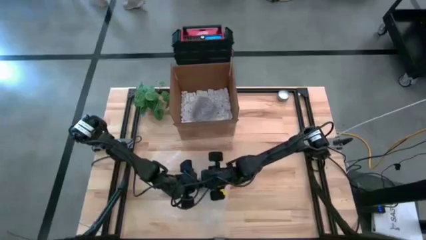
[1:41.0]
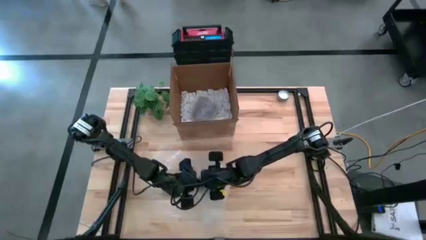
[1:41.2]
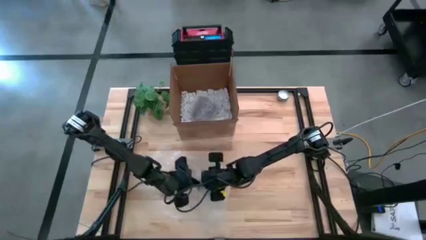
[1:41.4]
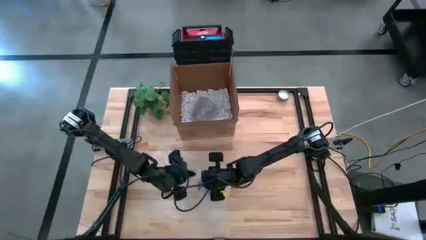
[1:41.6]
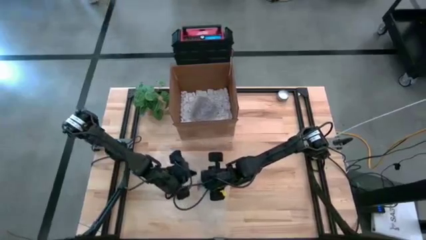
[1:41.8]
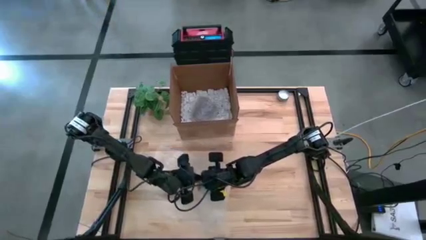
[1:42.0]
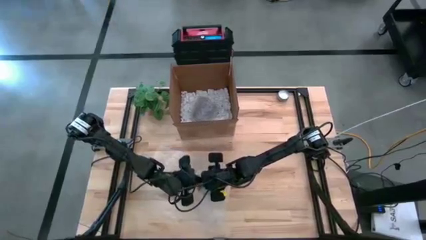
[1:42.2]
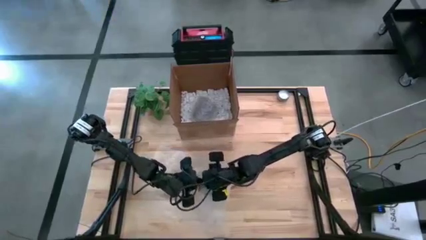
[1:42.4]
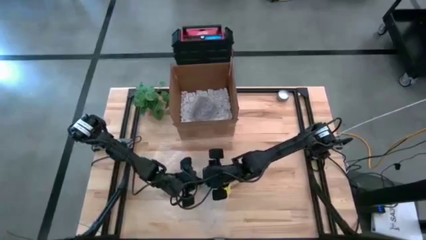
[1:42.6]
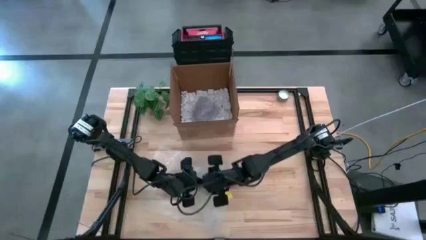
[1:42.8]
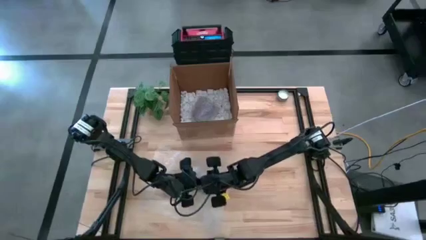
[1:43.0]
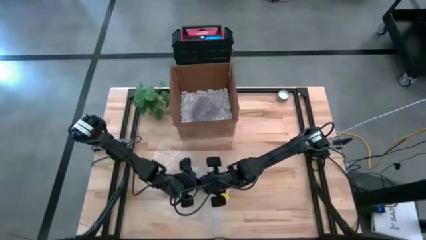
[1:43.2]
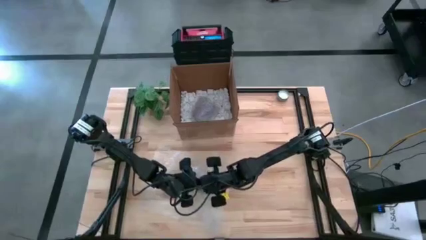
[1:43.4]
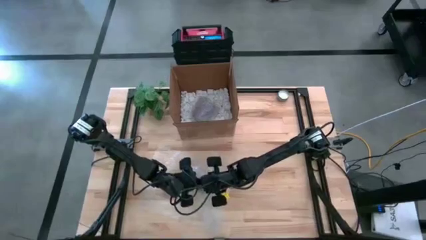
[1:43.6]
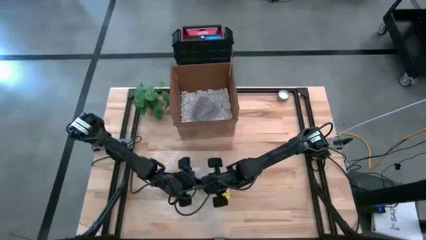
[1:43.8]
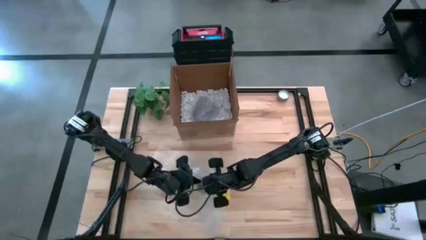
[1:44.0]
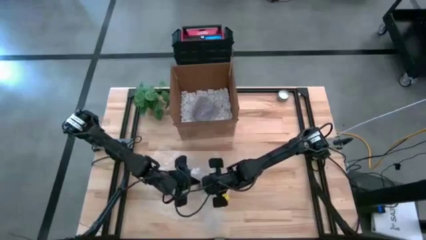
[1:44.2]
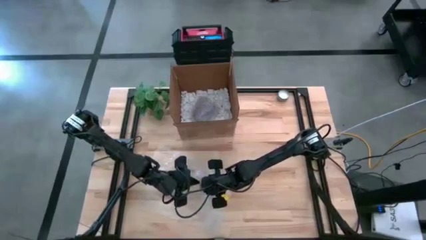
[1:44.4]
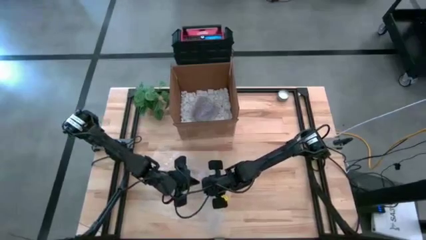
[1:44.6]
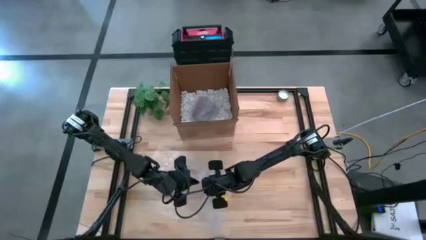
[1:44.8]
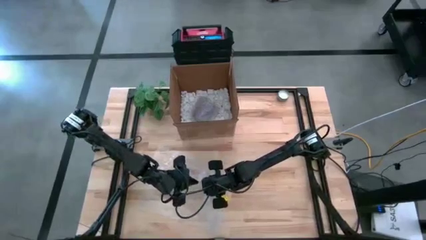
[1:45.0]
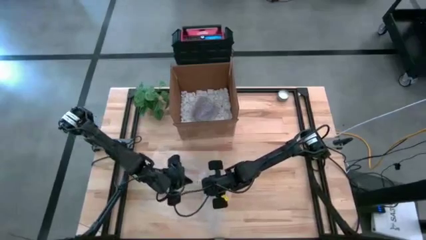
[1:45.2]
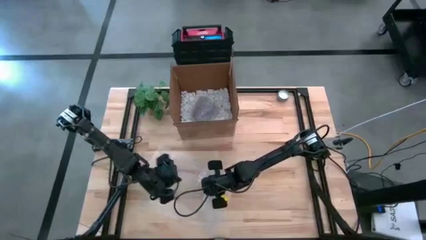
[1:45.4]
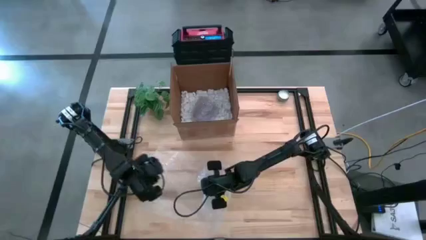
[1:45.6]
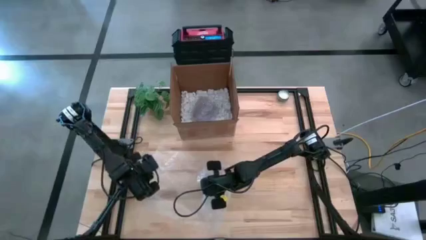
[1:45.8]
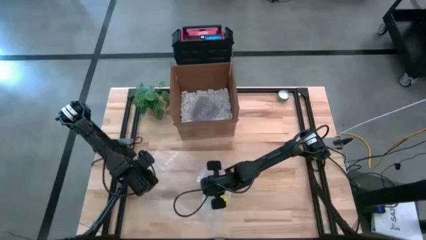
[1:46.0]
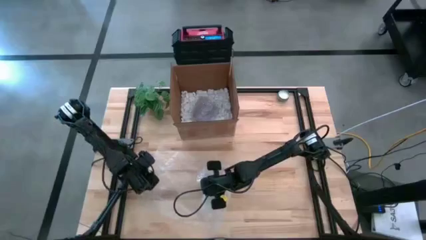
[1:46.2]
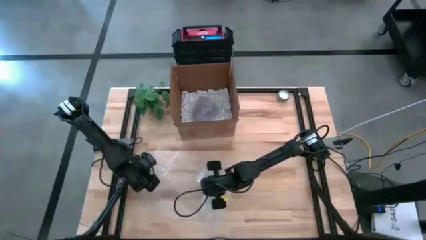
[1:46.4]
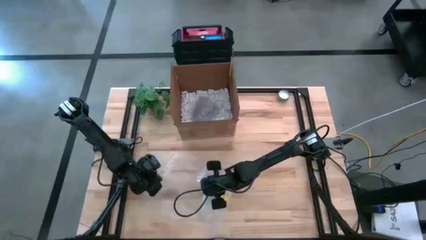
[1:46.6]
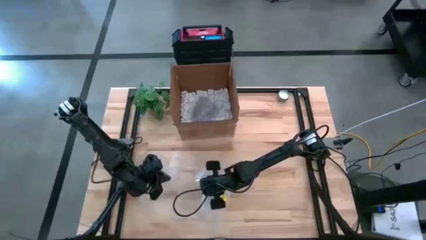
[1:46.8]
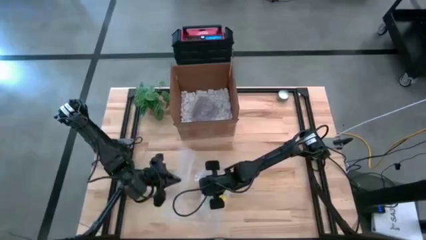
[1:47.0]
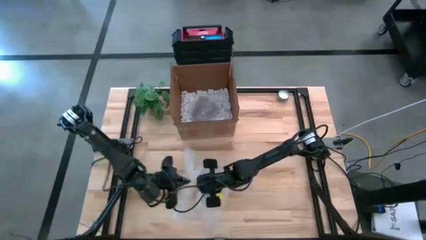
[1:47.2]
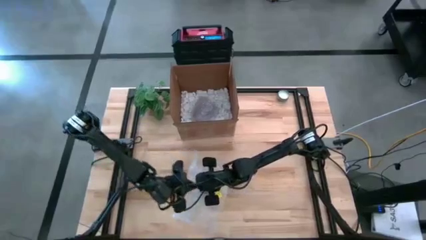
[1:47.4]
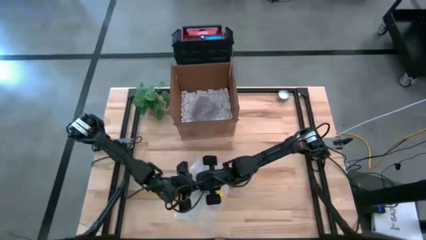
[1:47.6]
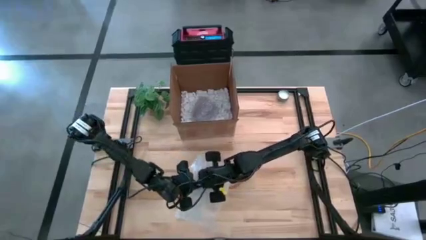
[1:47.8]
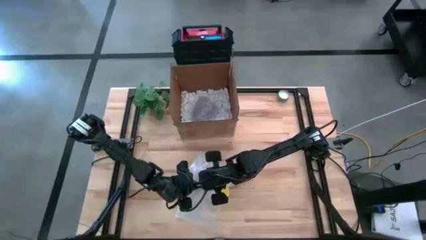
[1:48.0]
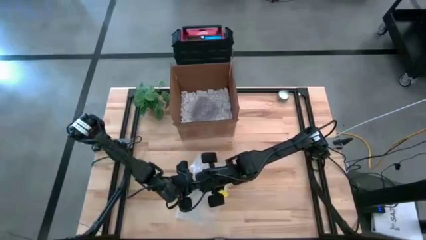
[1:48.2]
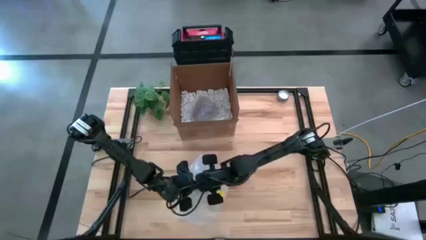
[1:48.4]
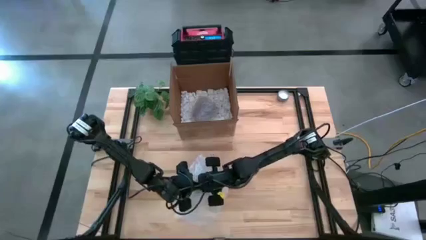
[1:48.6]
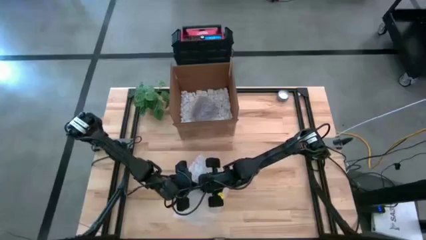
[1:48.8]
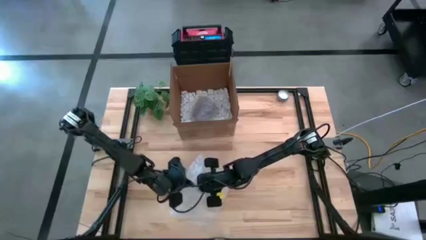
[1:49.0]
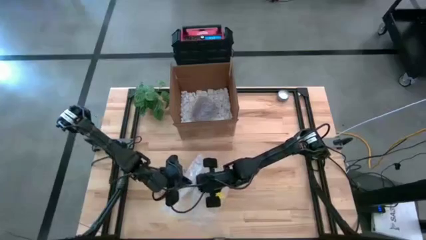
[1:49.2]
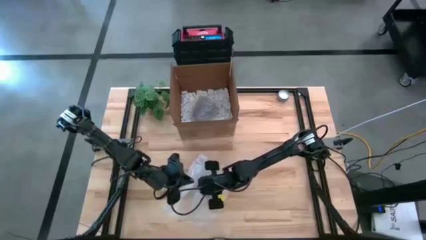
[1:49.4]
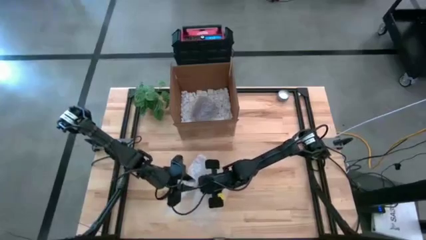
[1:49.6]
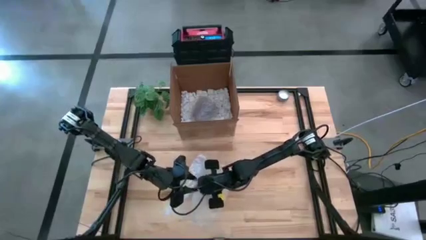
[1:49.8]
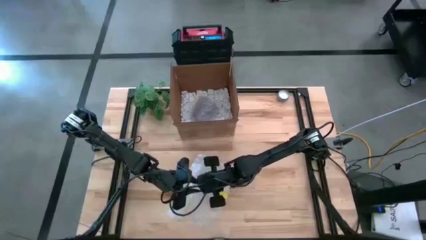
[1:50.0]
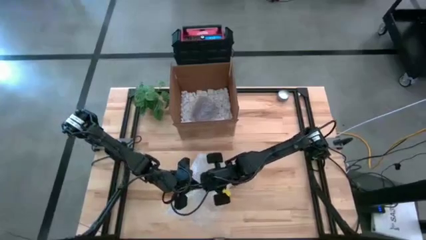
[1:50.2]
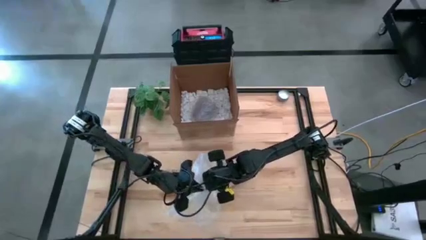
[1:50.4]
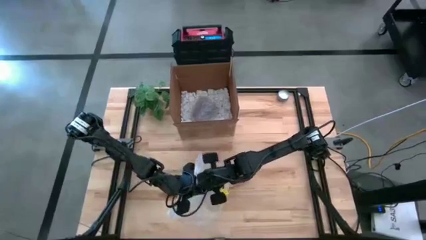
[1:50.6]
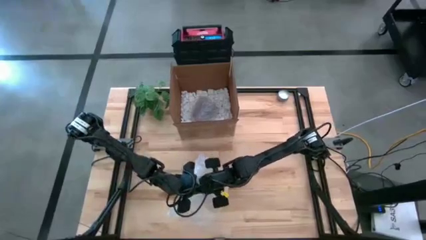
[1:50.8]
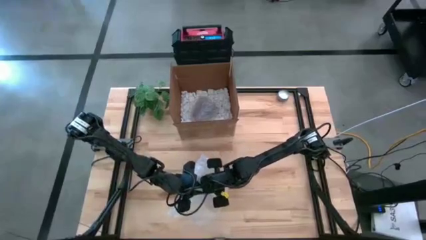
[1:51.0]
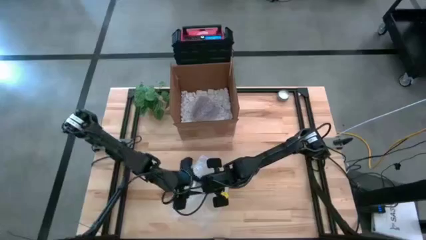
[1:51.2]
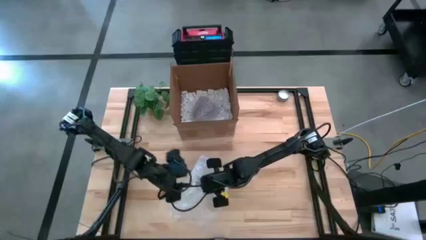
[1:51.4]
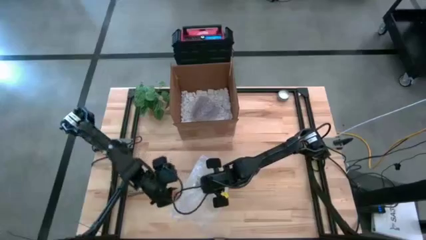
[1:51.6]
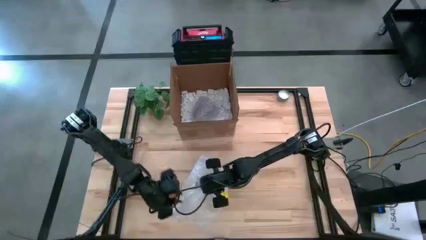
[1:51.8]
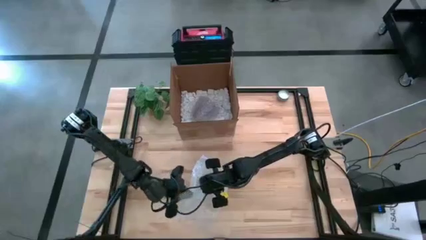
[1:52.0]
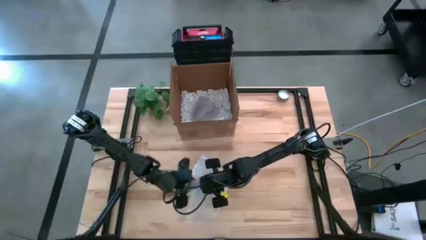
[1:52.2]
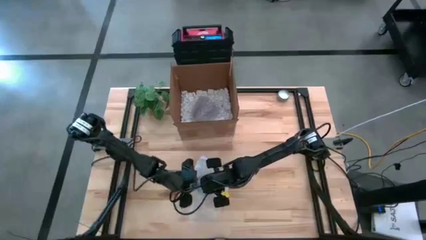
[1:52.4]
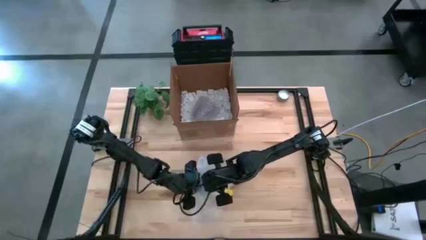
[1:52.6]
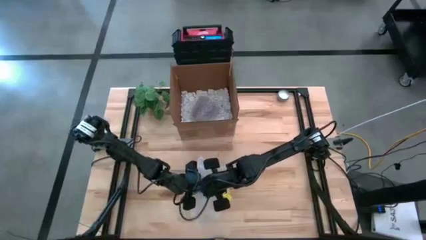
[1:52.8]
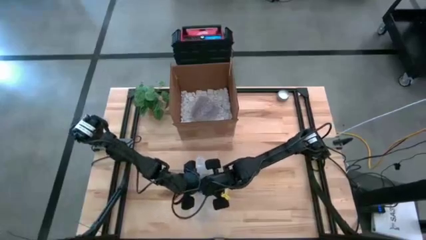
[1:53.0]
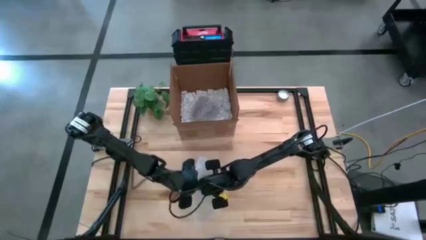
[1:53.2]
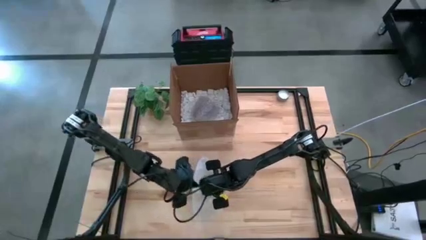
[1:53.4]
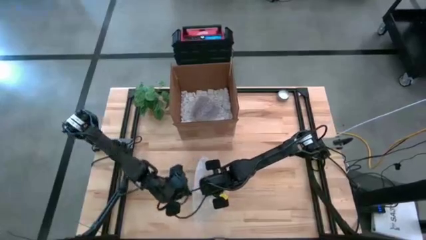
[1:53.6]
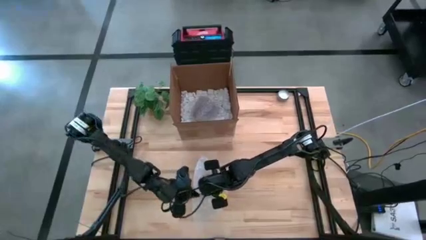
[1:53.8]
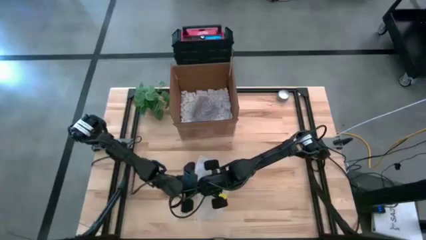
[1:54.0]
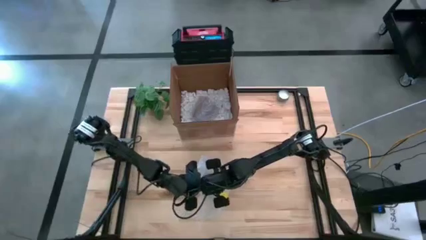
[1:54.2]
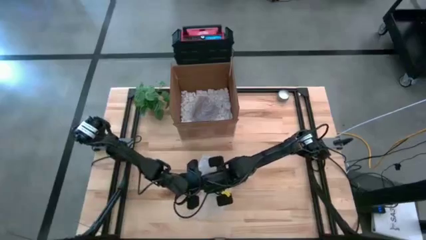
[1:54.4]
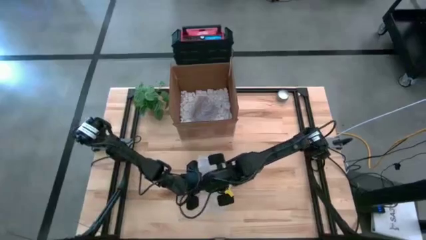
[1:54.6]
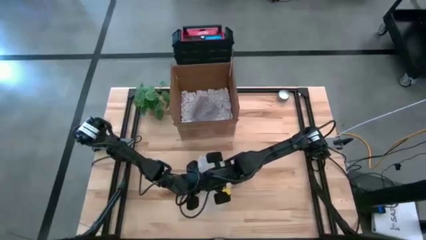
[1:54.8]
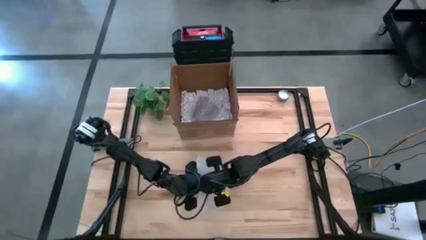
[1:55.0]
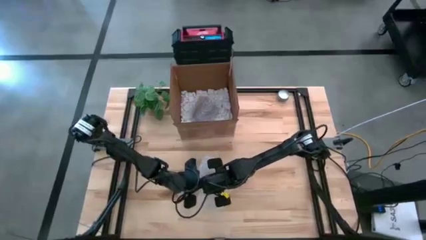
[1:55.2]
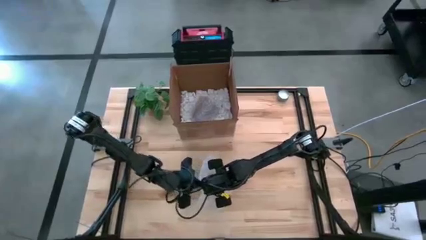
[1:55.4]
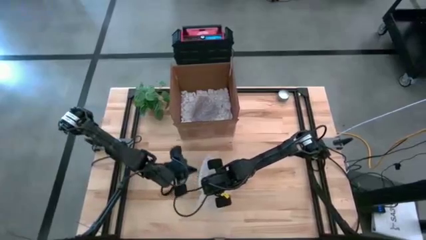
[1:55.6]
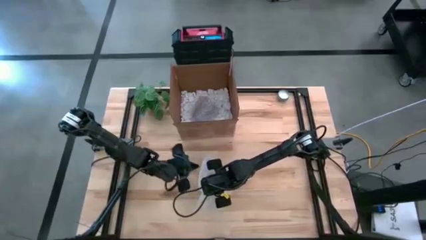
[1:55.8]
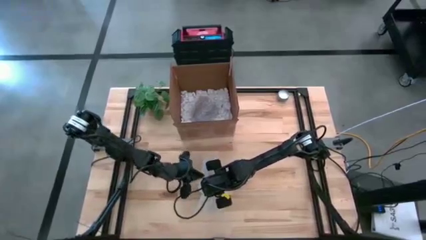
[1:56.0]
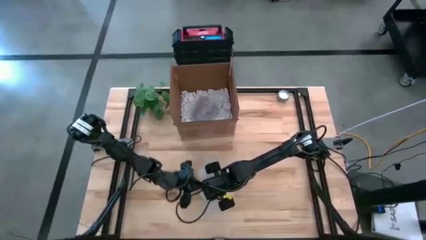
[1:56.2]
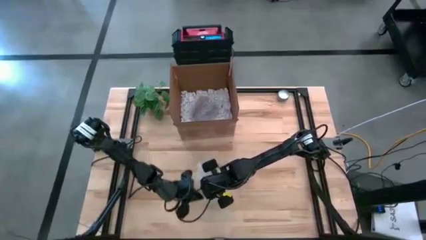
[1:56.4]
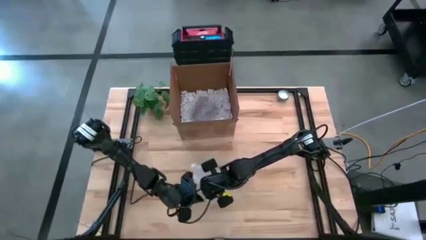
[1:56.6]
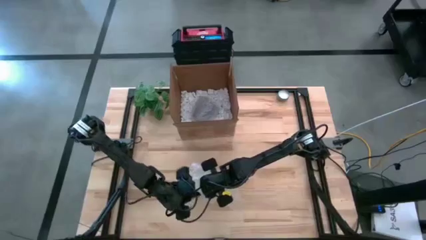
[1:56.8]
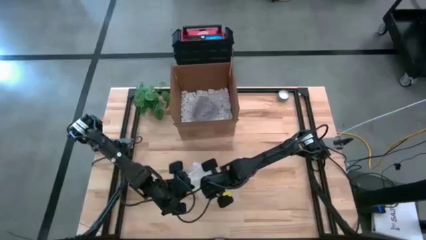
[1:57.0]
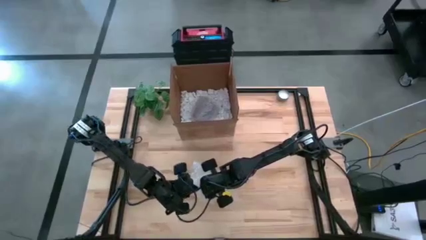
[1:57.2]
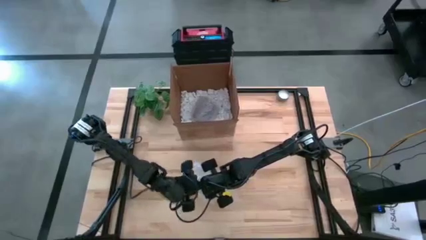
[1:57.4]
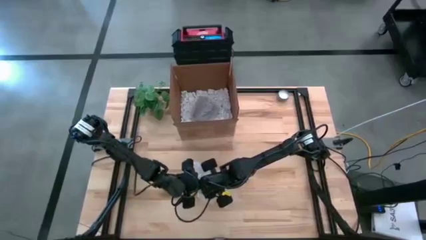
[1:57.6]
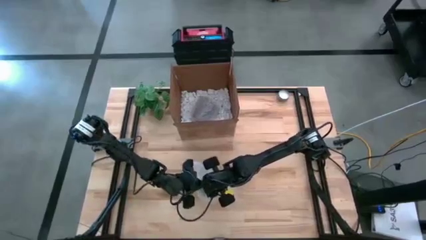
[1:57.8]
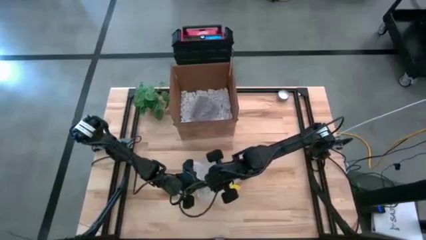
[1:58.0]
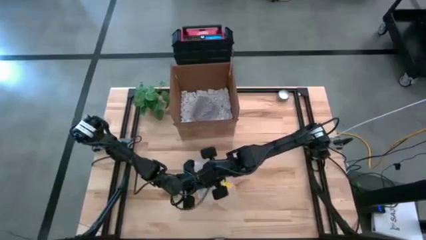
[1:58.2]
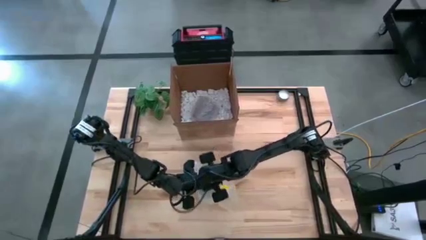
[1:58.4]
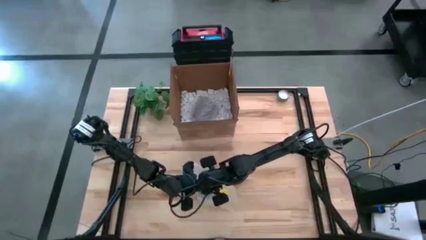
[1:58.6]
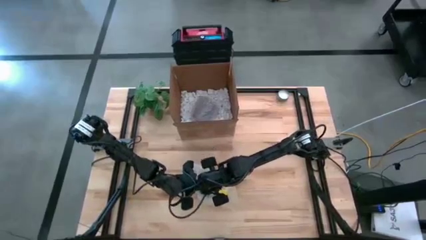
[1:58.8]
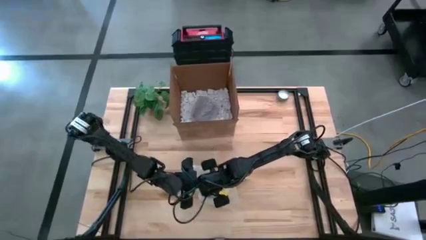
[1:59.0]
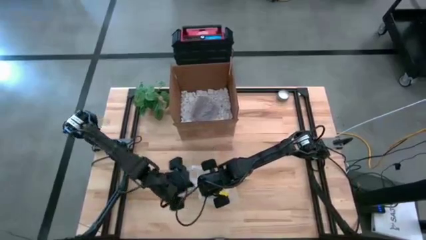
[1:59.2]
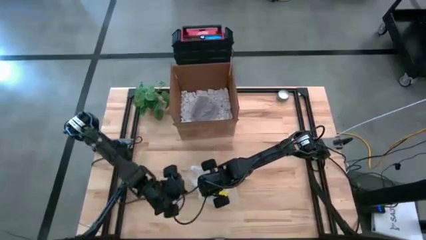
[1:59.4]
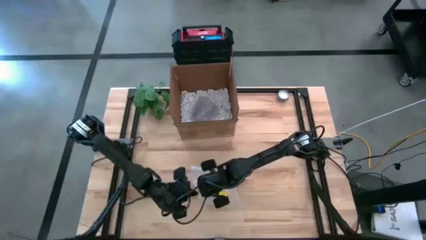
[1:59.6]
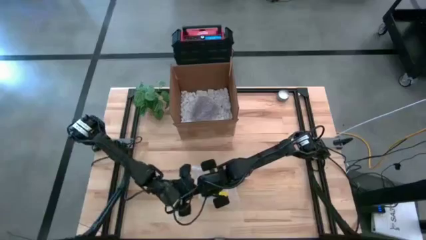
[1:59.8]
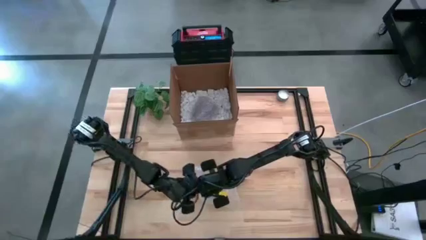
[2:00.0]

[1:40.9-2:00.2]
Task: wrap mug
Wrap the yellow mug using the bubble wrap
